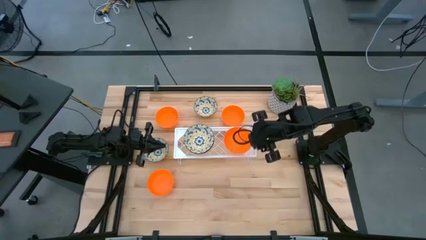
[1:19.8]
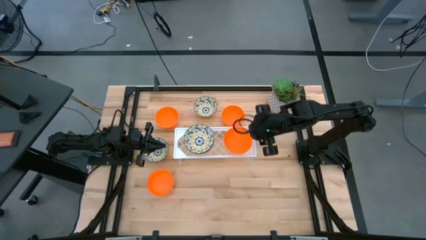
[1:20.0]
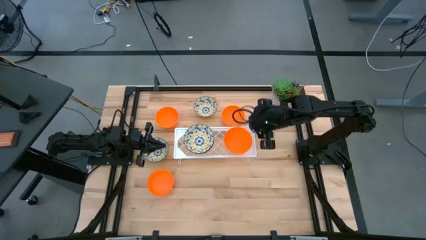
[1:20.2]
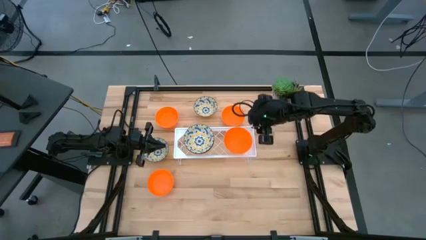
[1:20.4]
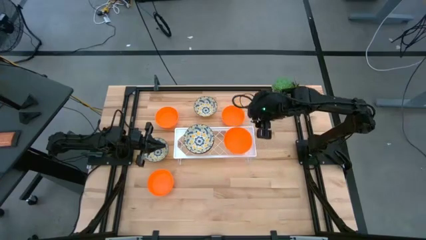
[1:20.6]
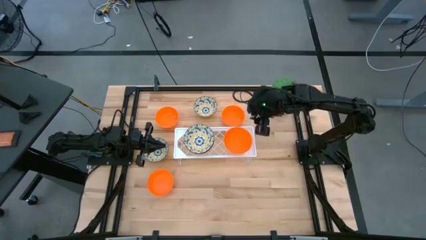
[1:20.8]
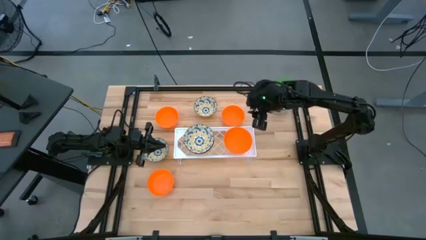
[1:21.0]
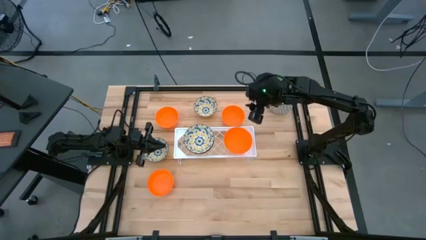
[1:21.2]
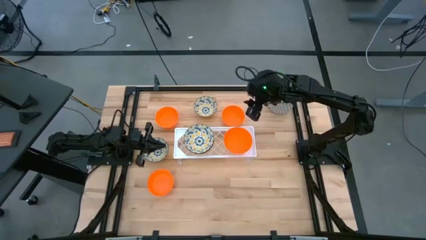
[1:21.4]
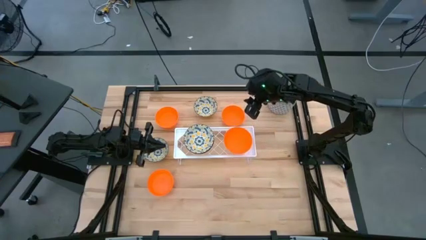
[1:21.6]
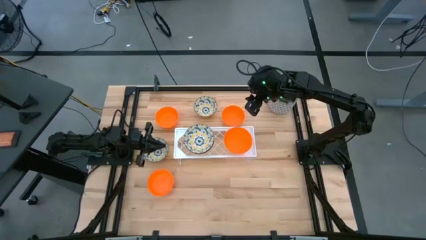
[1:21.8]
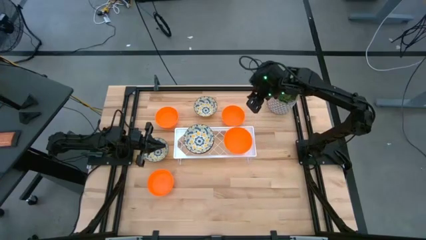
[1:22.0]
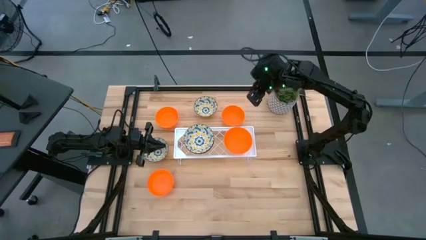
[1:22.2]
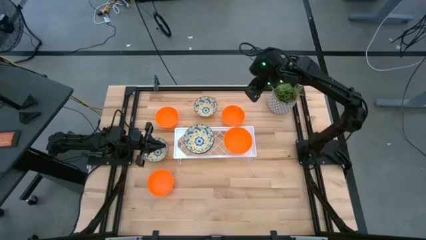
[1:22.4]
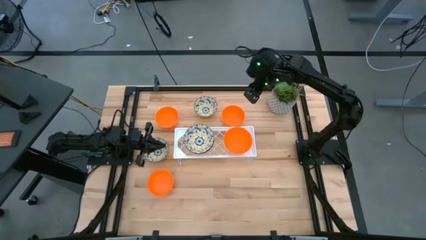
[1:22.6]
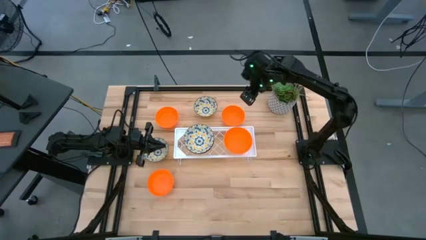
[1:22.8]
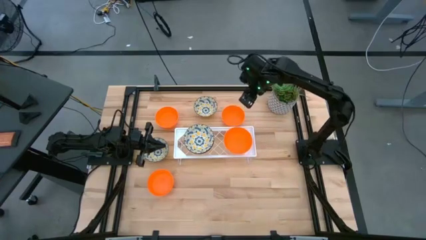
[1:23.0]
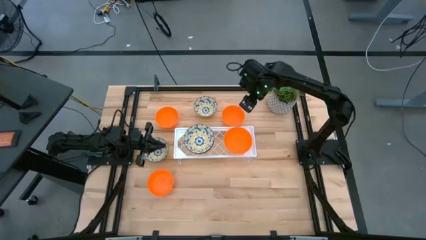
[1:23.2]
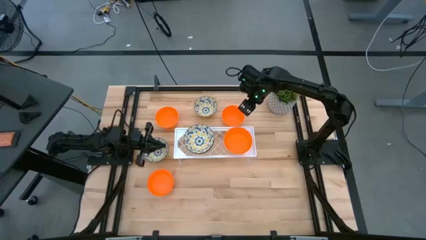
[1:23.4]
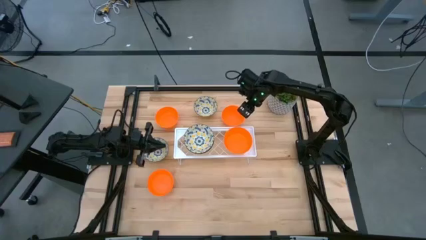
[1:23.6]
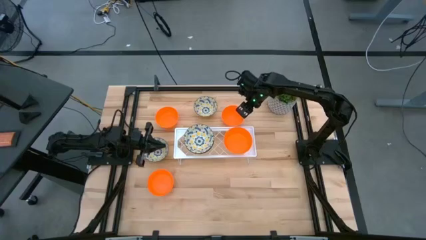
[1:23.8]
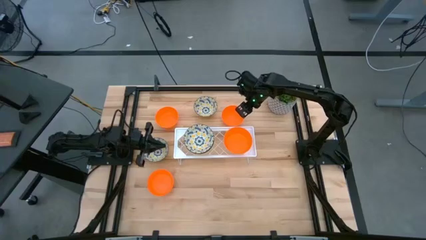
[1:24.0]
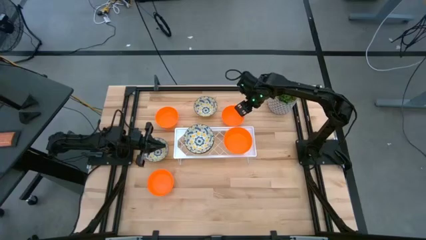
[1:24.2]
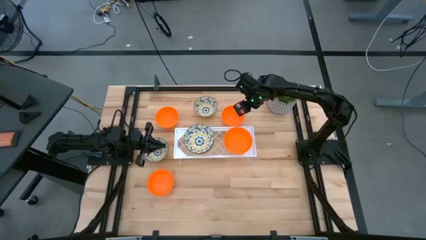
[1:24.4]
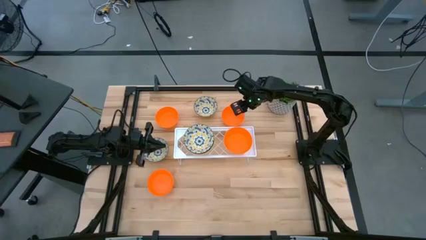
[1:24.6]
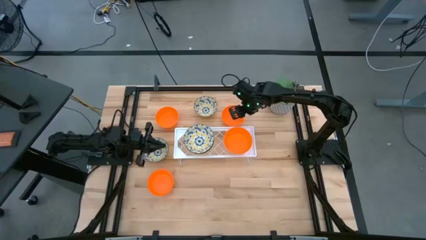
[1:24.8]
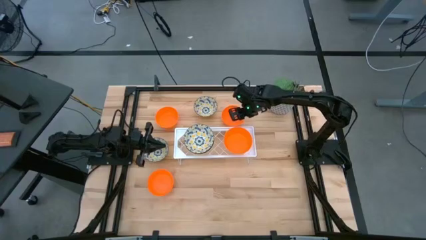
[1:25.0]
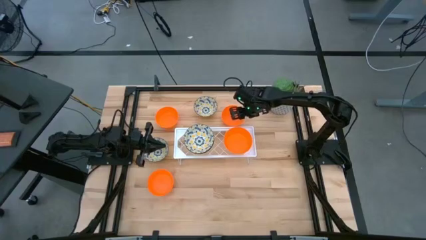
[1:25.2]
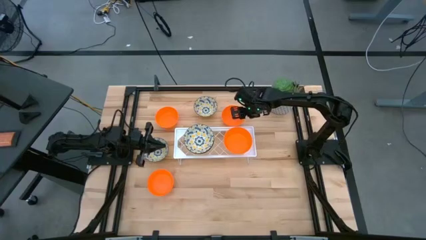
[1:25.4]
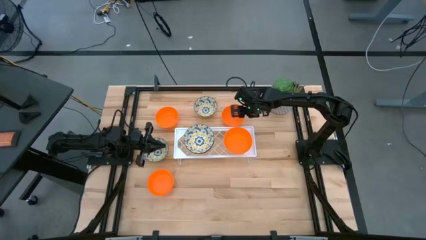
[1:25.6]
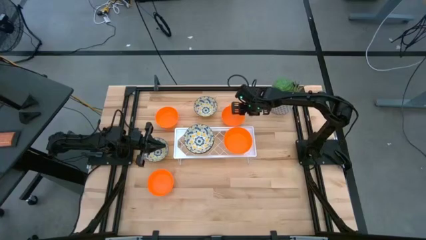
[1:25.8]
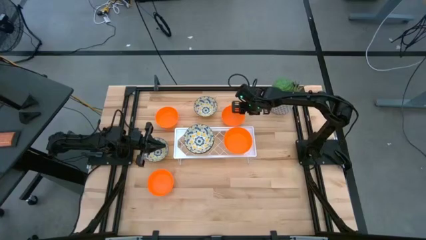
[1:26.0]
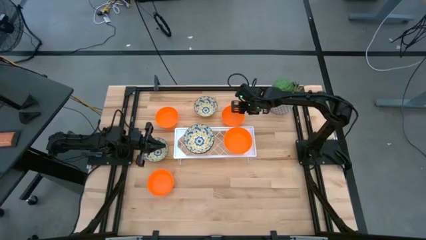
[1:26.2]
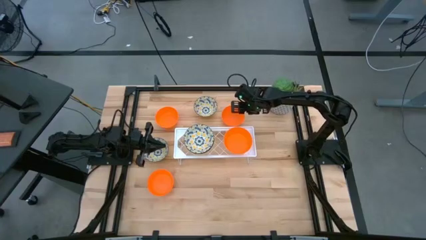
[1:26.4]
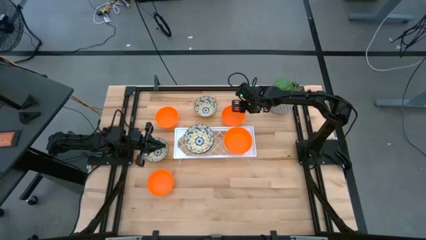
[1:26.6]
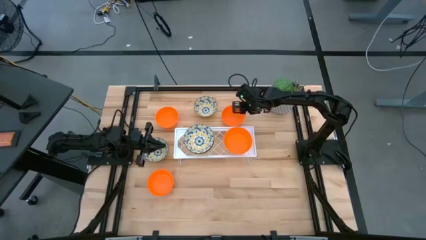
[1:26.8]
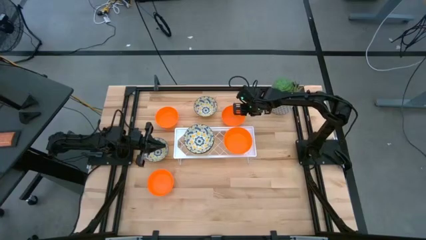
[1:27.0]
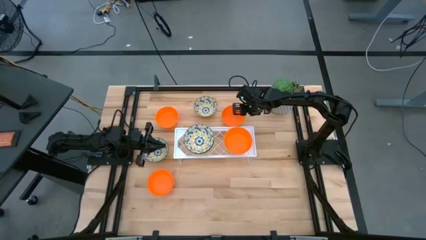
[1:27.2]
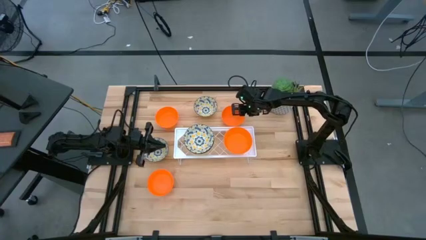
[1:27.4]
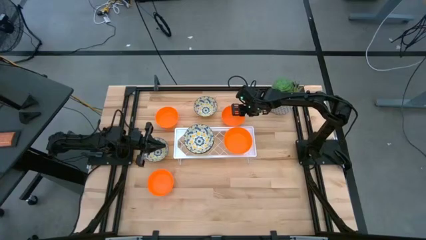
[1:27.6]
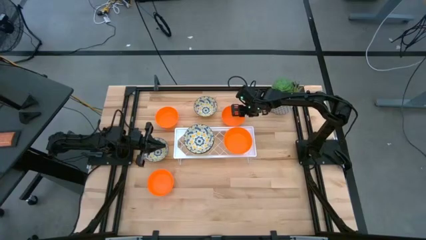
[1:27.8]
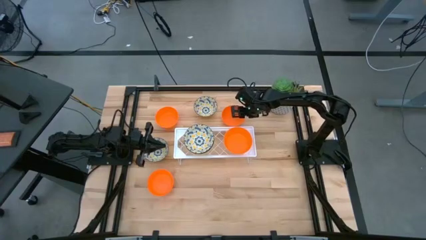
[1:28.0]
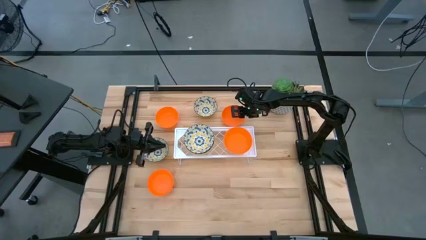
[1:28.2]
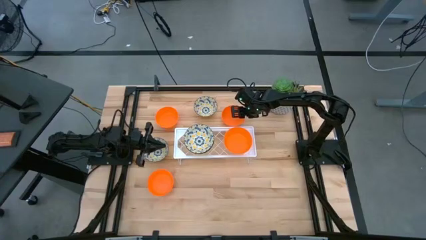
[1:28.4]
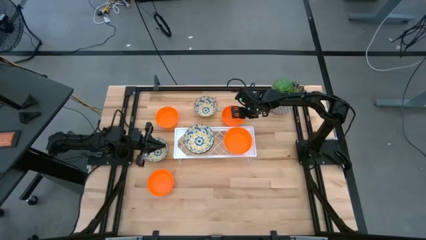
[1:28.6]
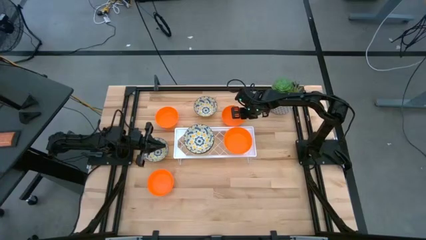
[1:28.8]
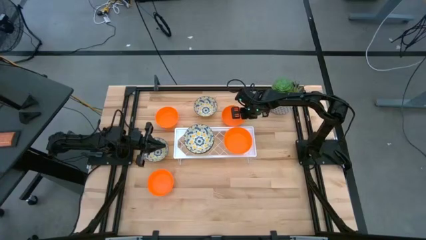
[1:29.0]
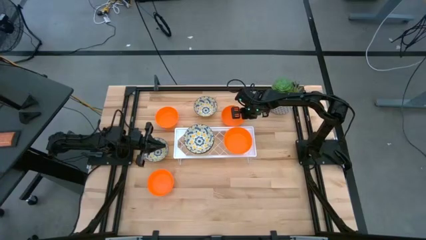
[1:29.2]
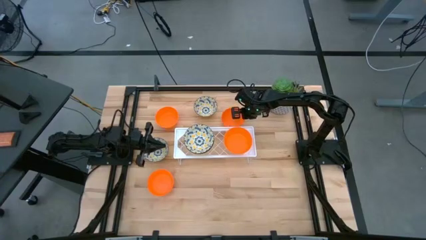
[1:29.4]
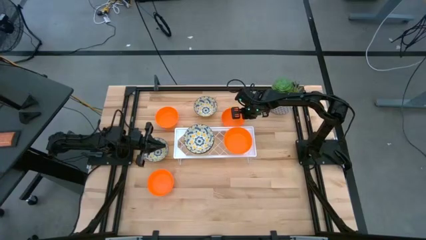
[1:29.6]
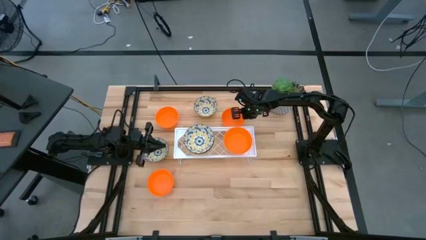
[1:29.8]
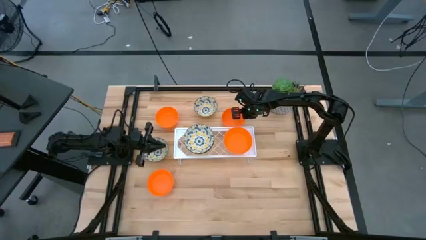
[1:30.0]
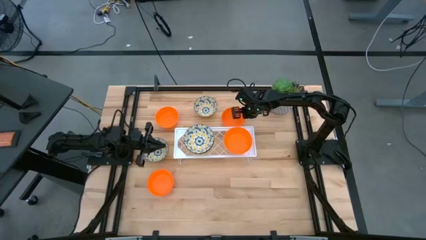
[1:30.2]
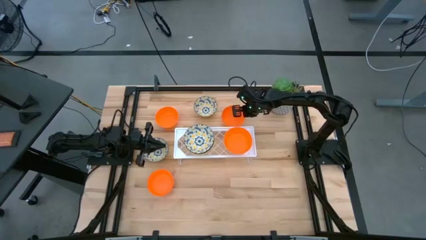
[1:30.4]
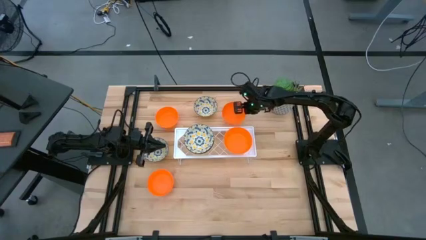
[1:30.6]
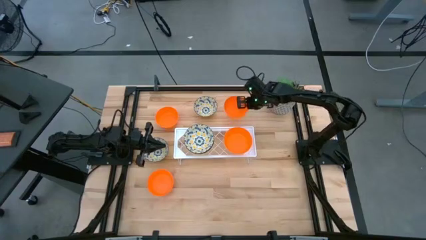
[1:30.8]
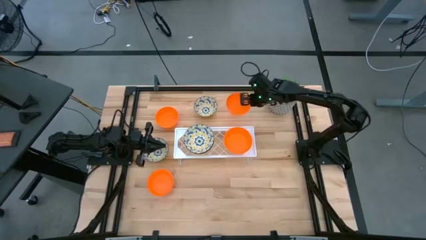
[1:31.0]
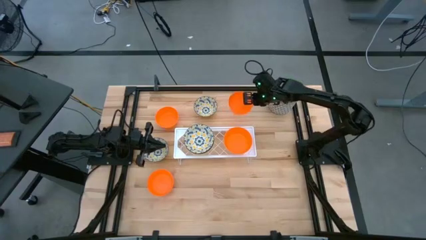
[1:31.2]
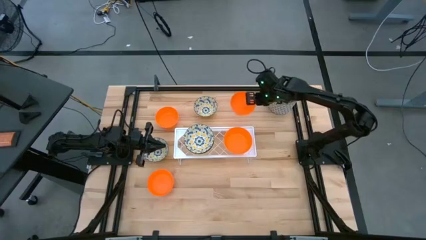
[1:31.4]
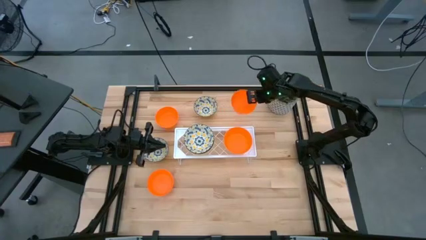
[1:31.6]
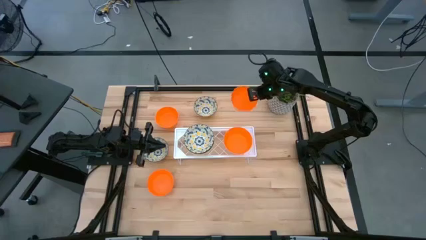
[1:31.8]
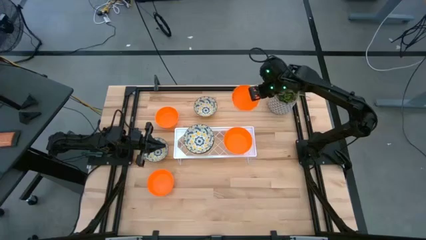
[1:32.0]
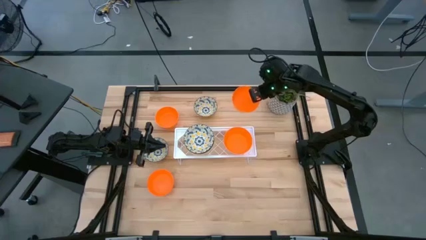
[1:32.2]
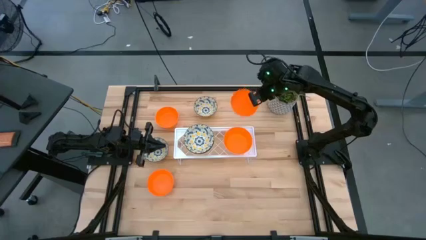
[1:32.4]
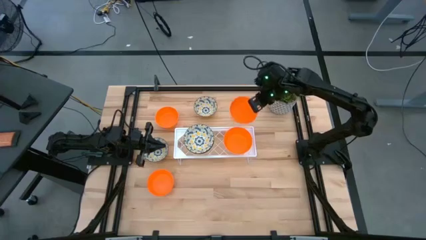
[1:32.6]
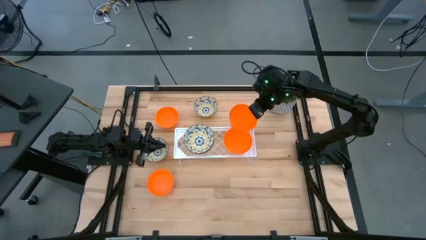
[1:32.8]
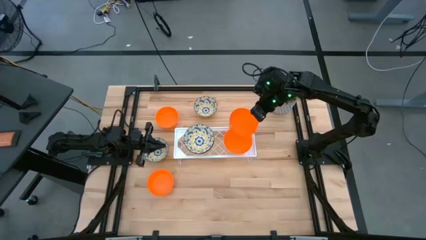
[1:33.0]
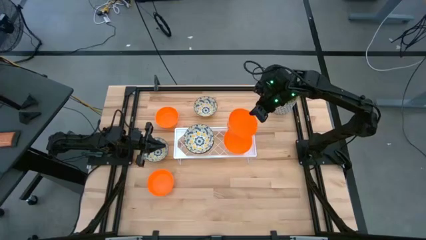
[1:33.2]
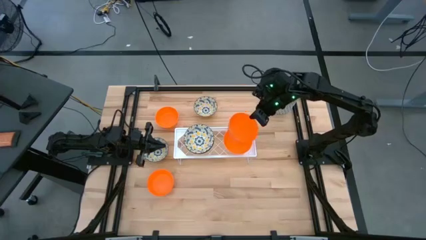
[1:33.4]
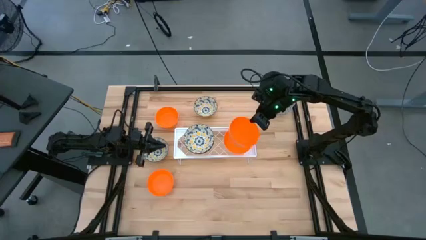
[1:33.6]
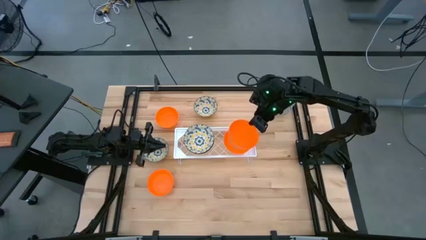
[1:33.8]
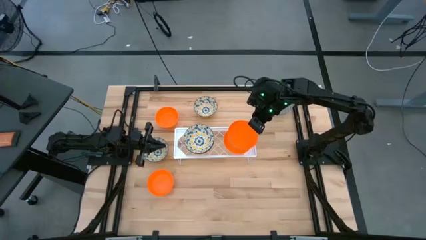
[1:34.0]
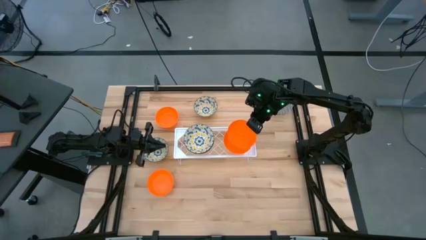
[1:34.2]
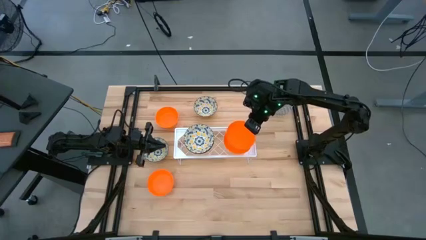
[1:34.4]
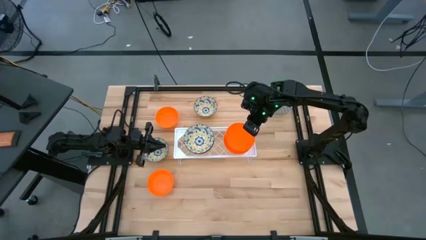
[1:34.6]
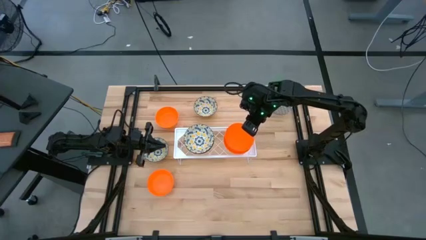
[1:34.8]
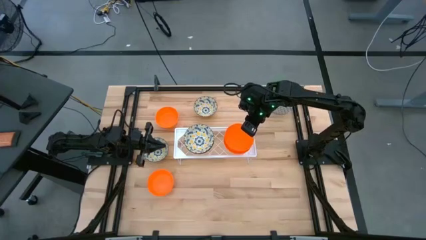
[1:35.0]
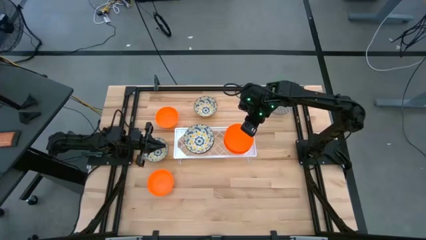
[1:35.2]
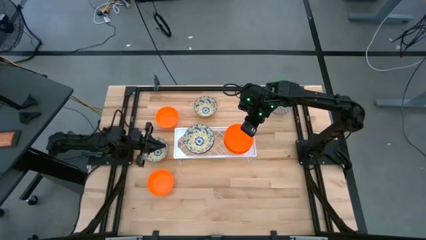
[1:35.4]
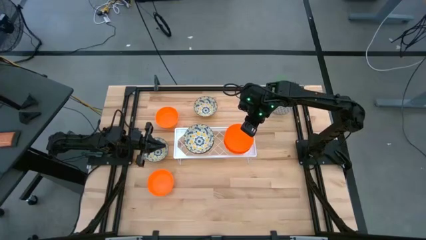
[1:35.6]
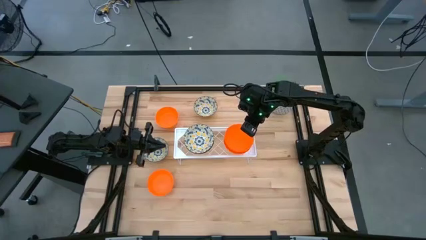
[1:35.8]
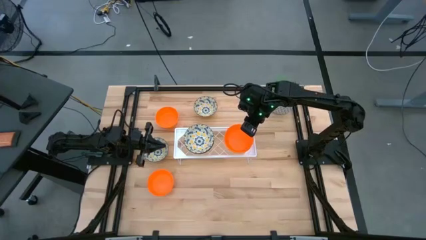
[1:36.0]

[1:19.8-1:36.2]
Task: Pick & Place Mini bowls
Stack the orange bowl on the orange bowl on the shelf
